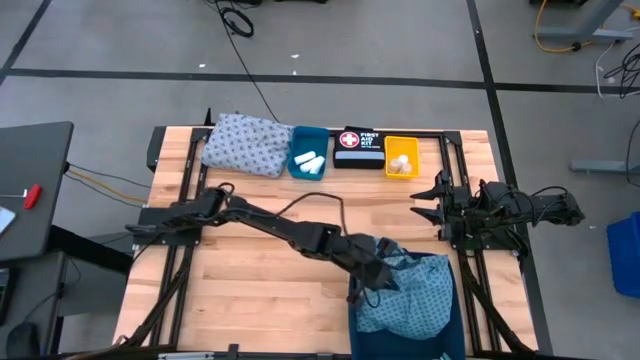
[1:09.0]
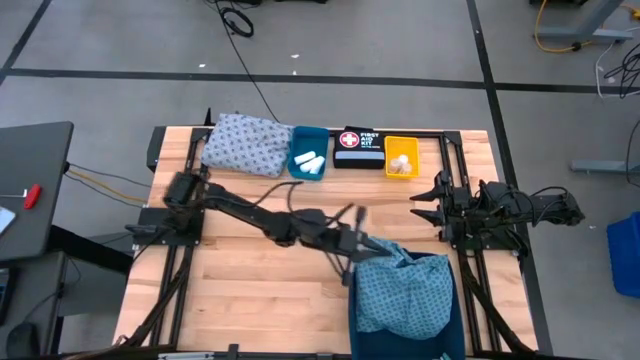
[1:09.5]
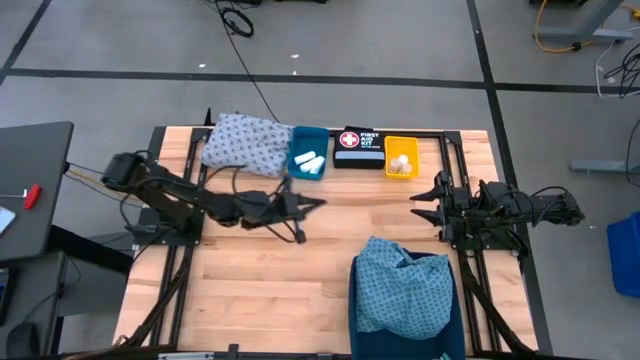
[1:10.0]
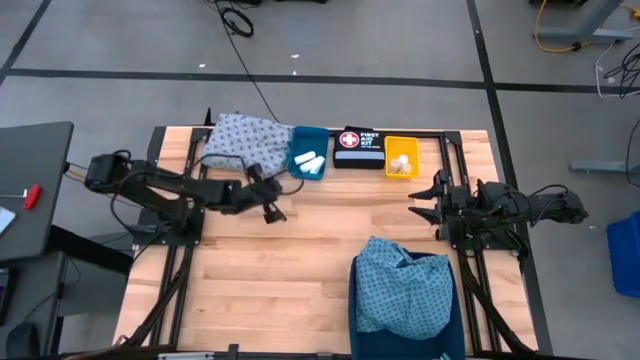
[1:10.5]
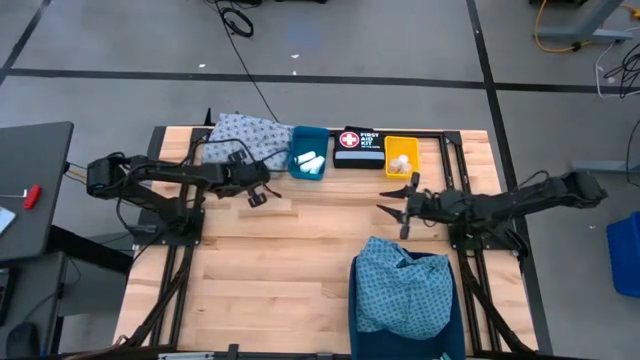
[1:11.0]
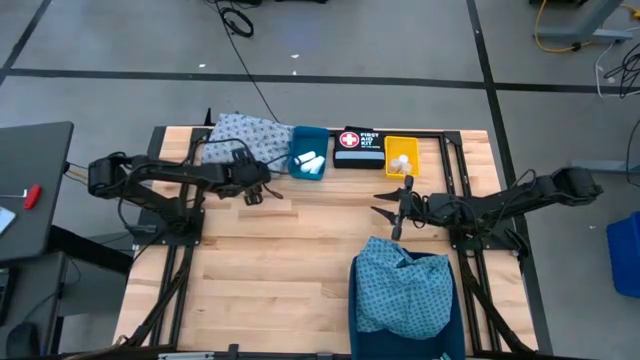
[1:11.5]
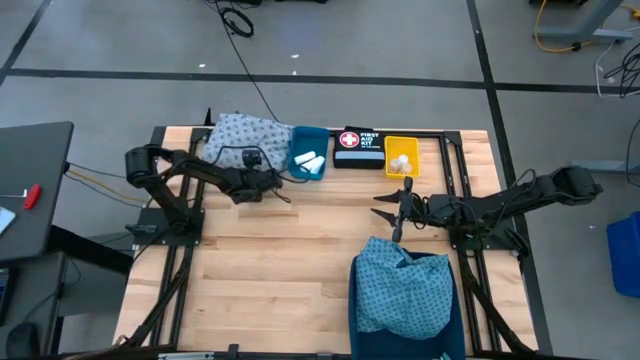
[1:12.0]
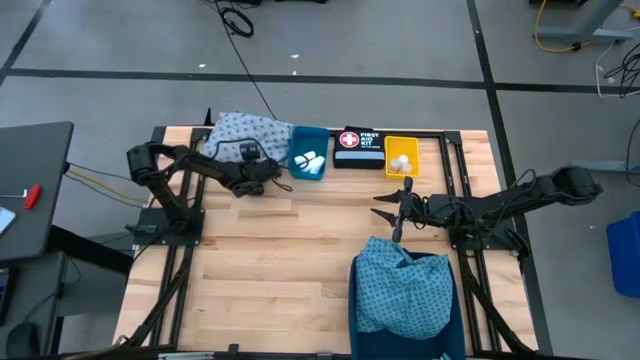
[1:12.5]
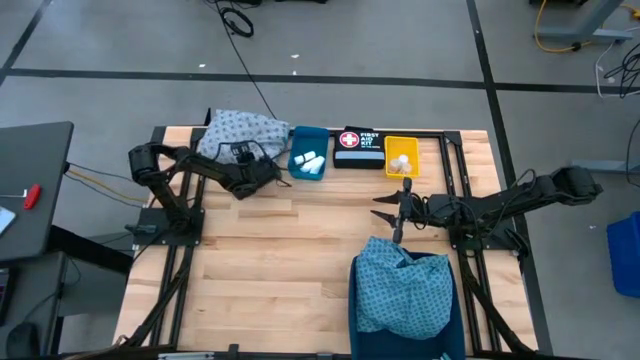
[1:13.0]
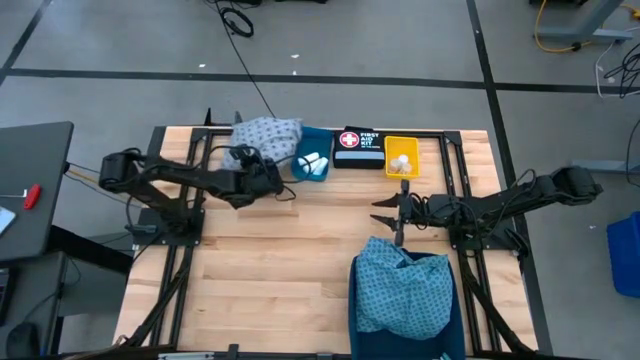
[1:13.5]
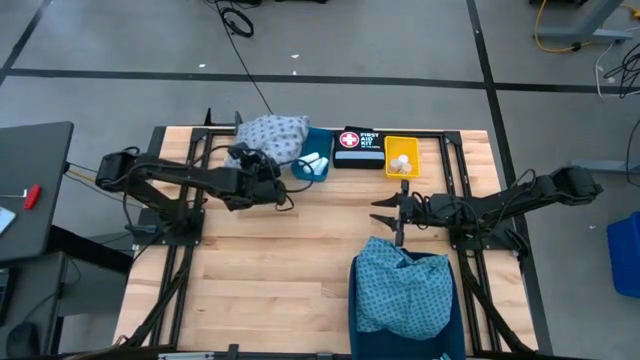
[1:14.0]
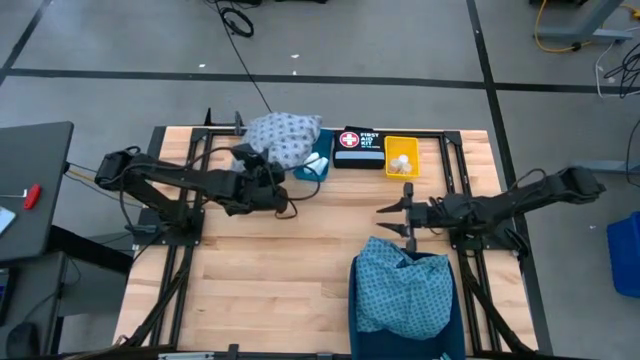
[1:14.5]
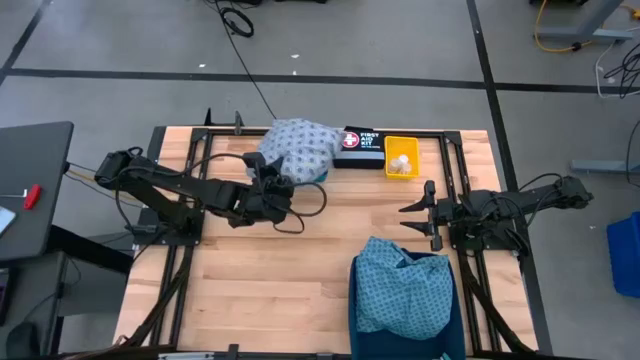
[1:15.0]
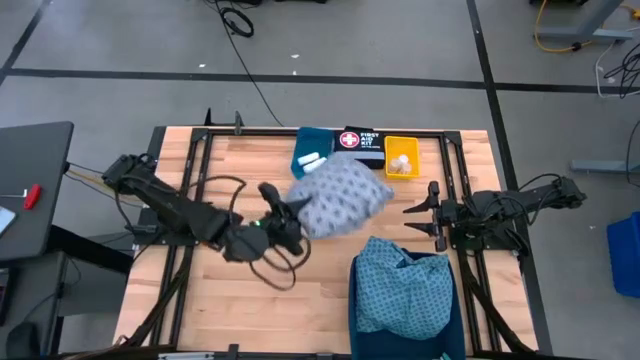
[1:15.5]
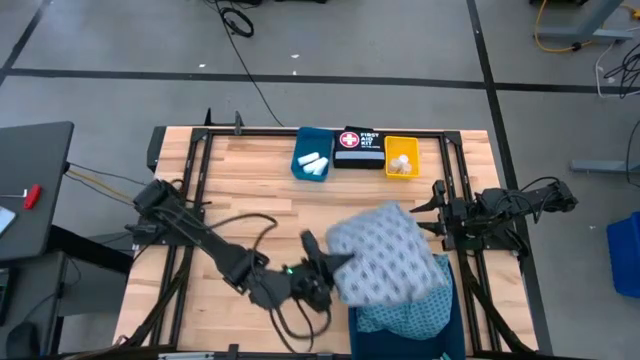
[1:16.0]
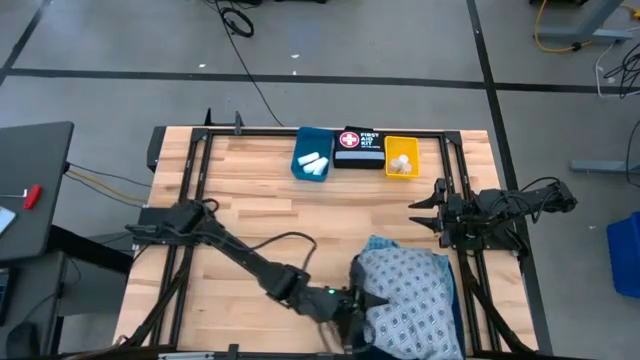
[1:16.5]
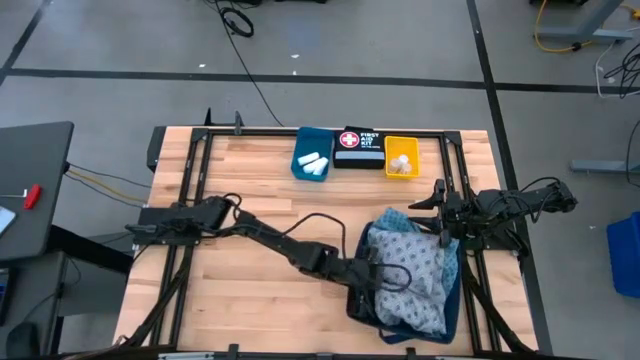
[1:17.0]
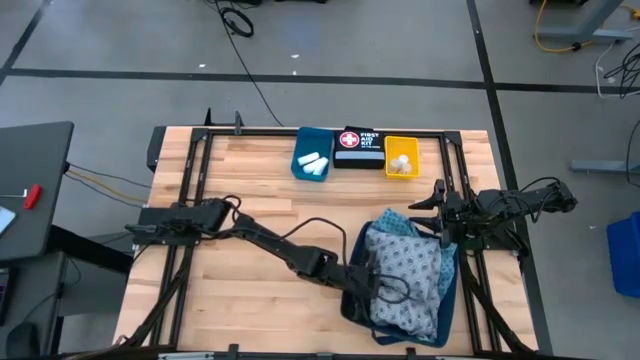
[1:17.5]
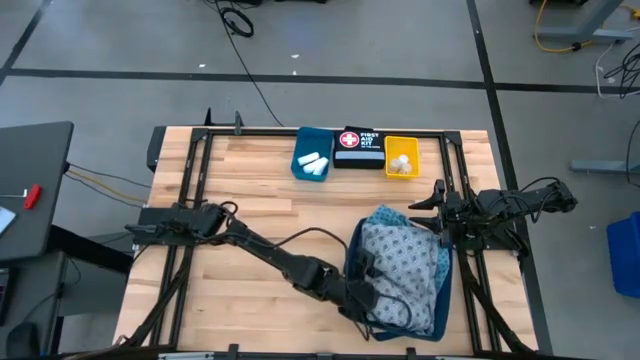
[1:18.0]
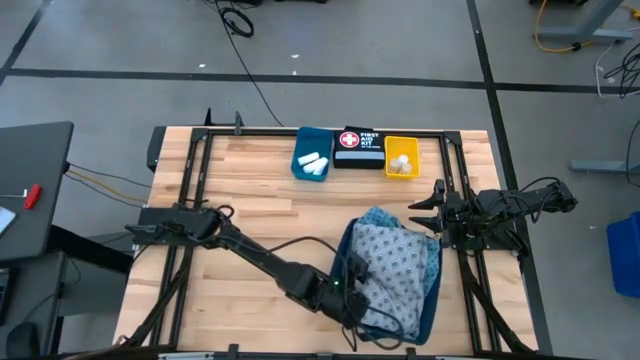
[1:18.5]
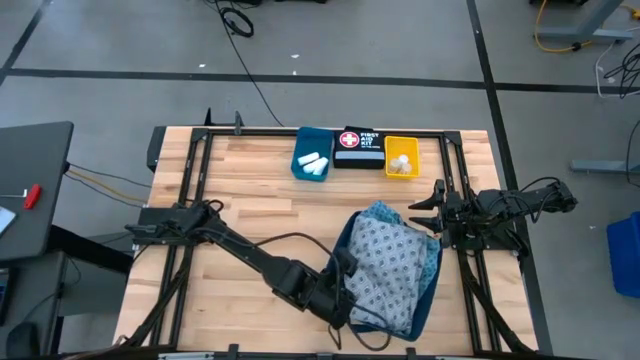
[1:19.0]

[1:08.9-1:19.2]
Task: Pick & place medical supplies in basket/bin
Put the gray patient gown into the blue organizer bin

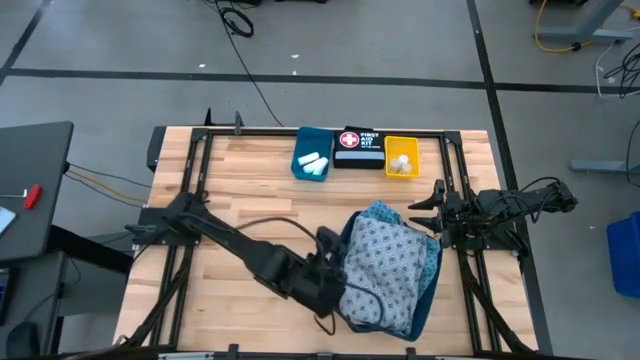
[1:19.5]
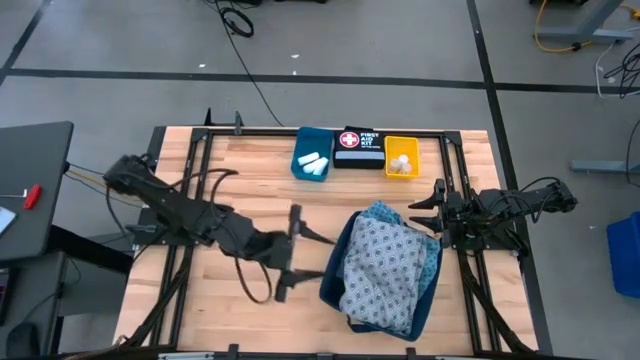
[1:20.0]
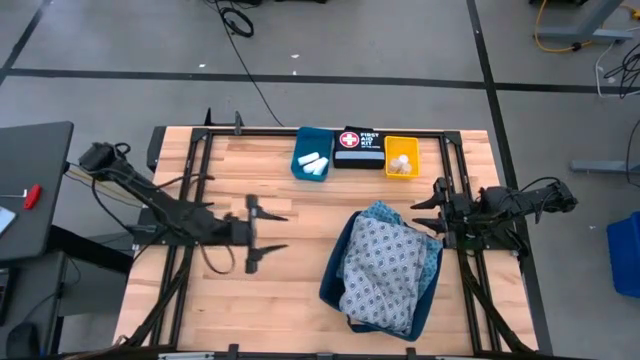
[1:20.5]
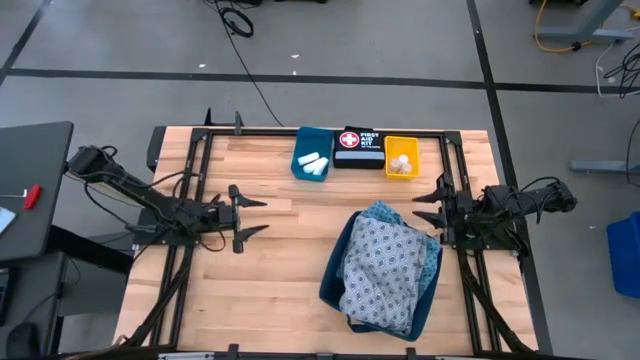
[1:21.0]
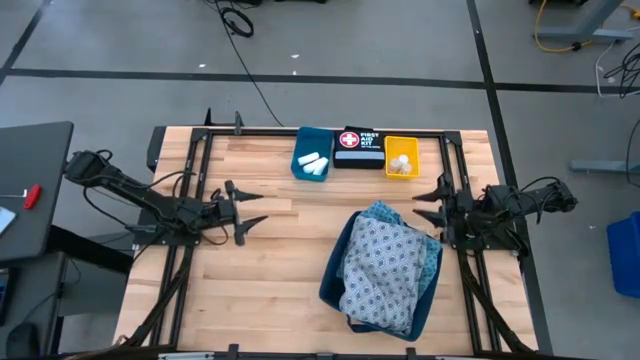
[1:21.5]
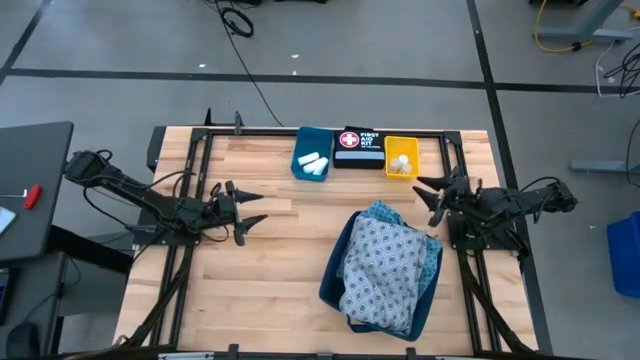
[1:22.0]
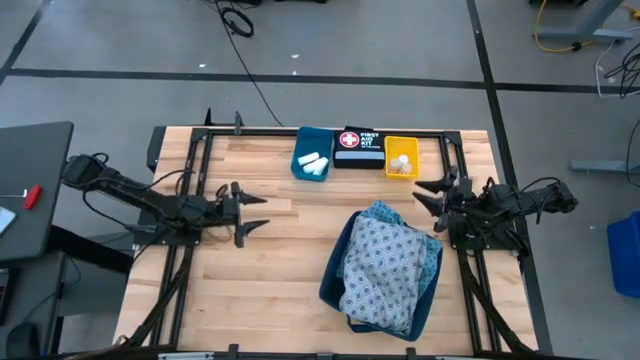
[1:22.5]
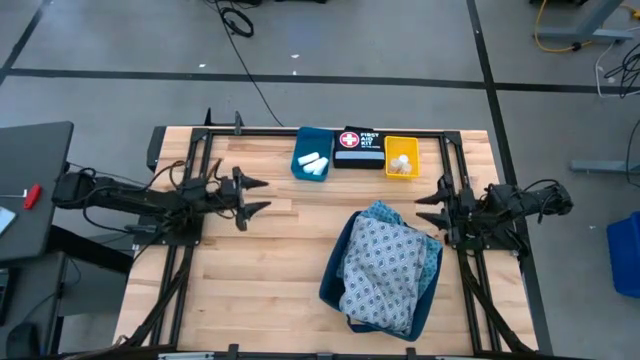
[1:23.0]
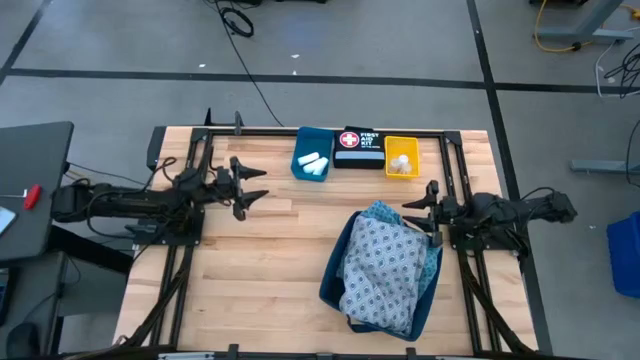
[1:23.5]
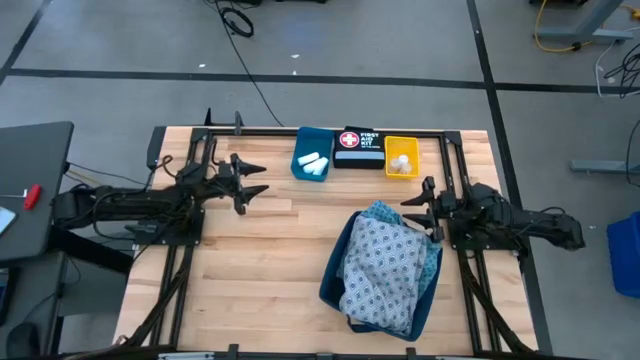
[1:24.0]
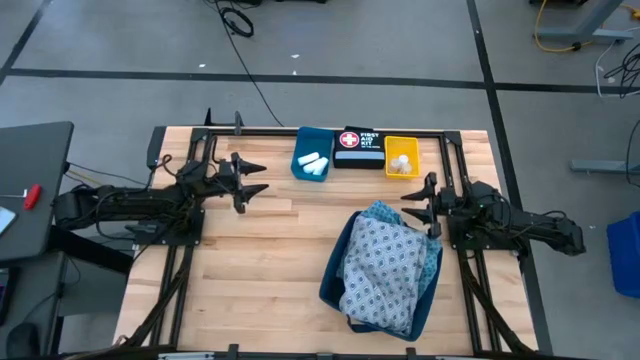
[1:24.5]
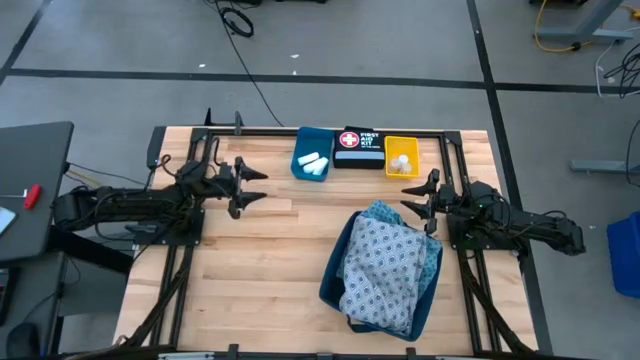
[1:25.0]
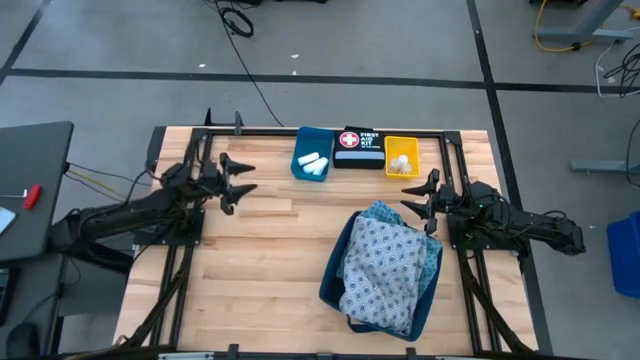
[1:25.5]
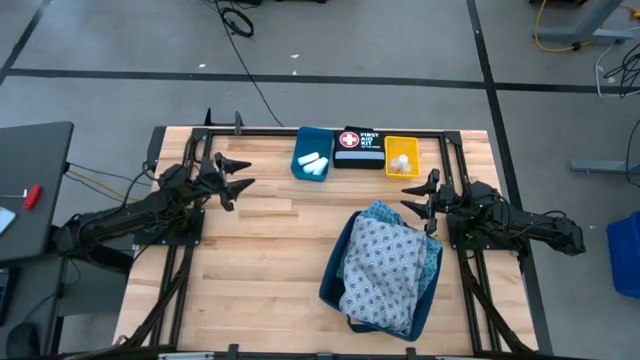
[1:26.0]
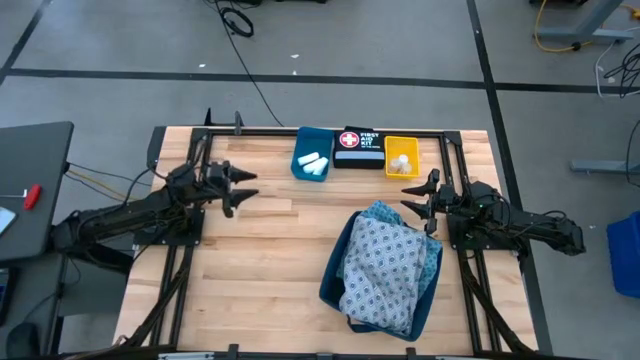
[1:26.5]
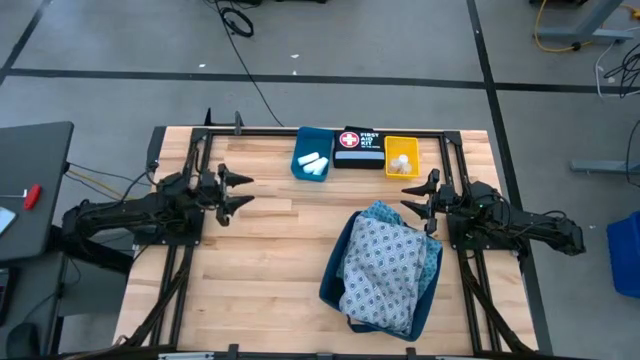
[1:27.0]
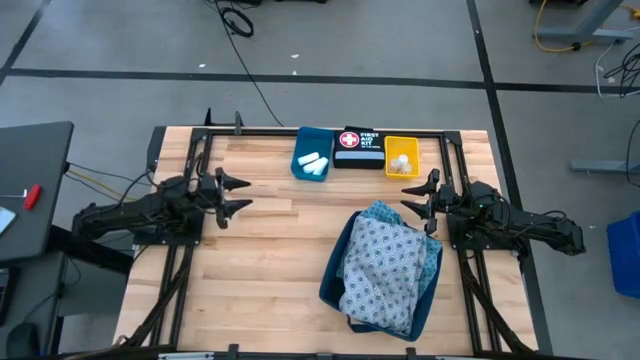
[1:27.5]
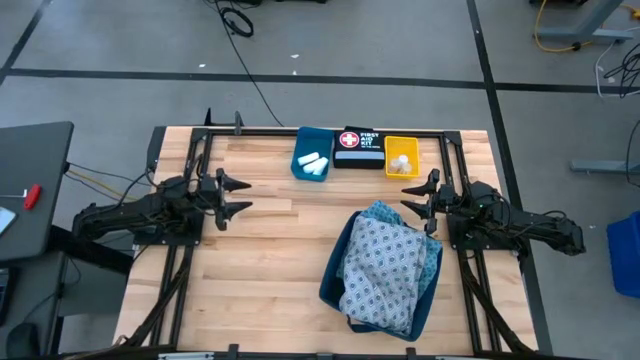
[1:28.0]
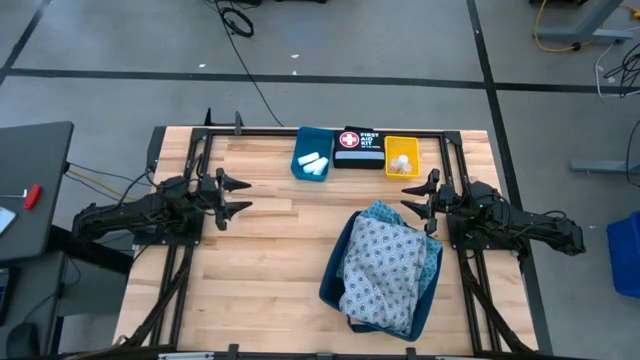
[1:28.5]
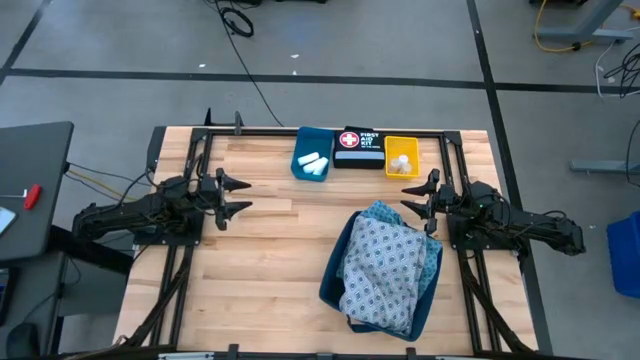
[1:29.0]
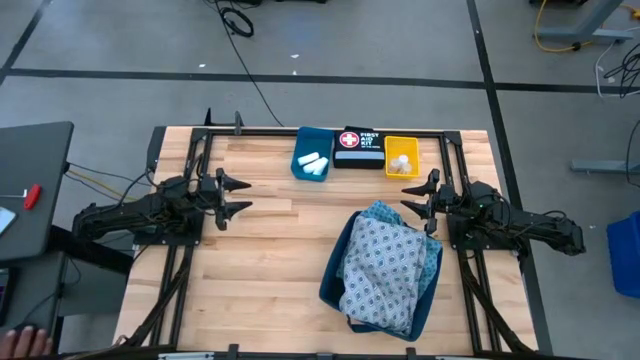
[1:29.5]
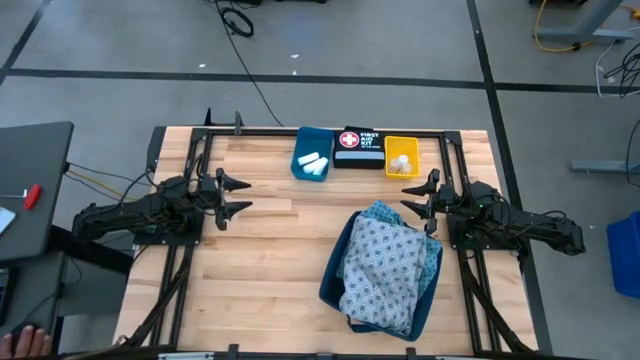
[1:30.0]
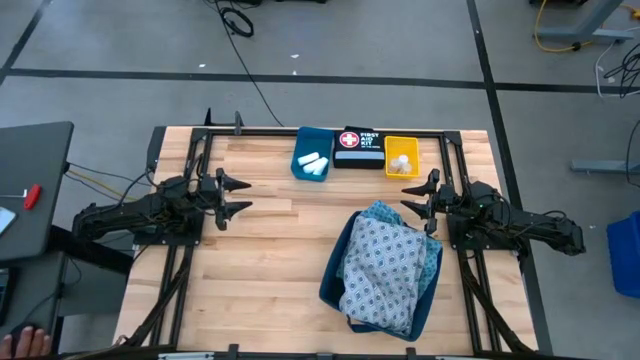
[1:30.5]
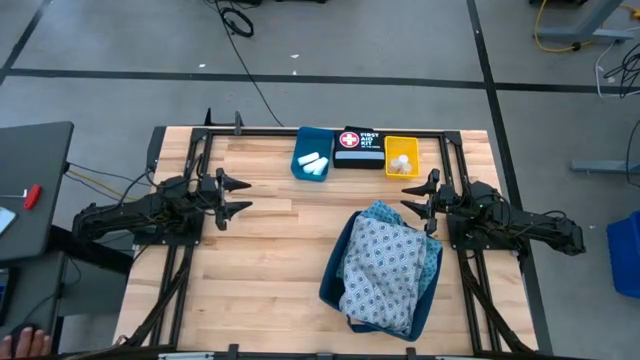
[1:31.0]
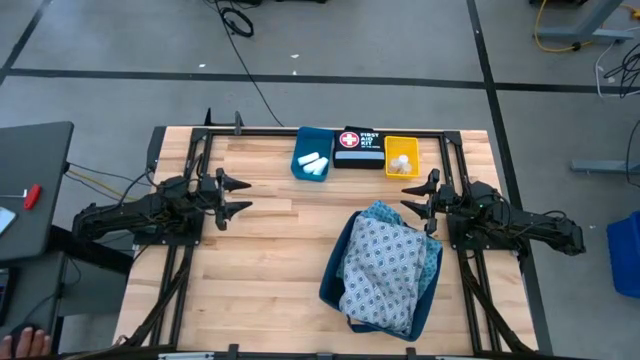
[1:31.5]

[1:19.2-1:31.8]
Return to Home Position
